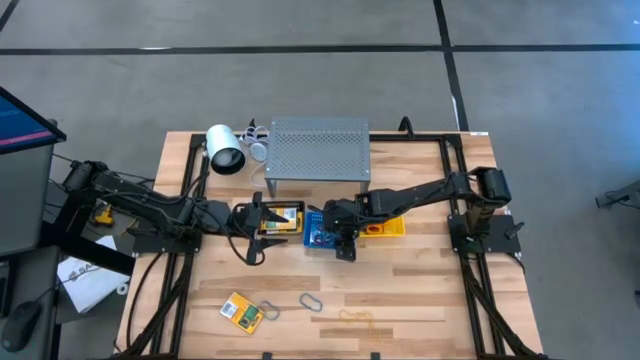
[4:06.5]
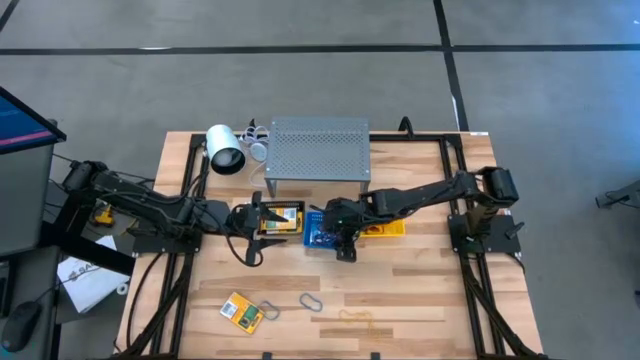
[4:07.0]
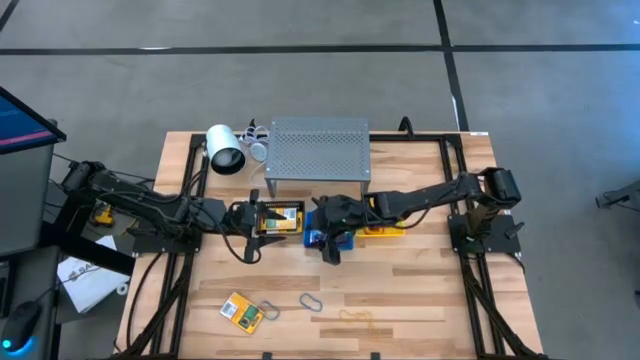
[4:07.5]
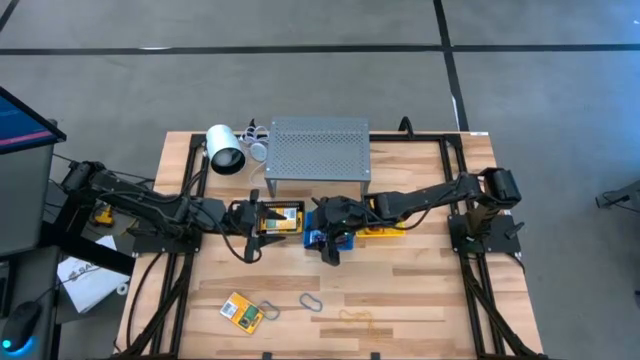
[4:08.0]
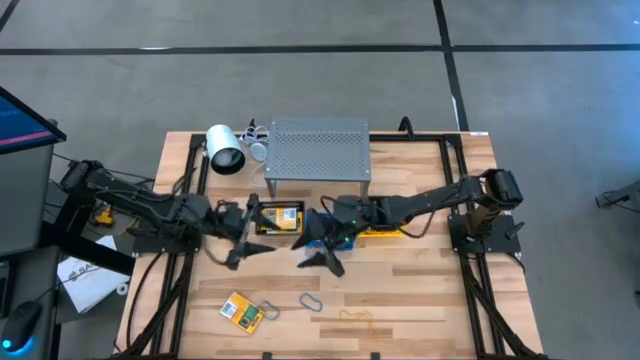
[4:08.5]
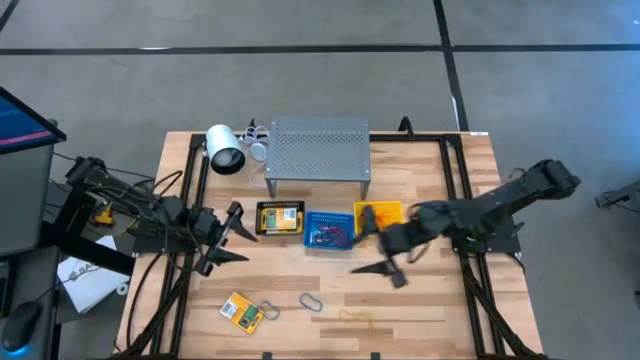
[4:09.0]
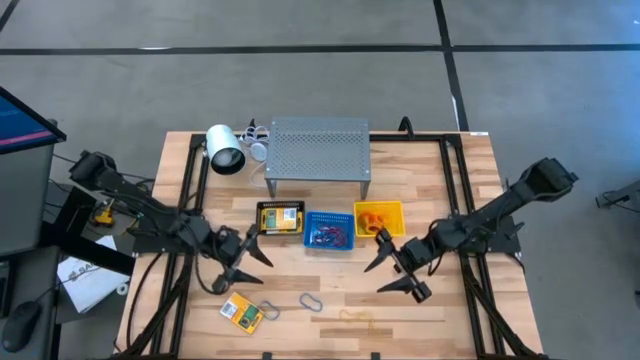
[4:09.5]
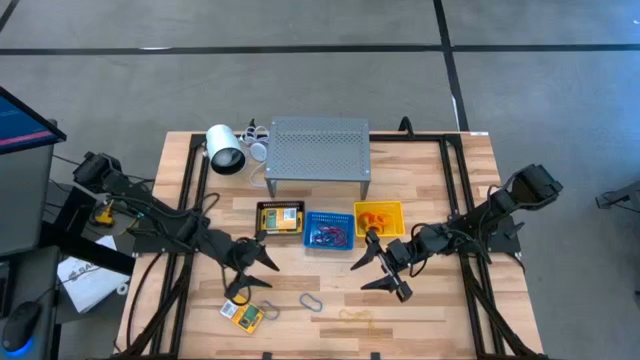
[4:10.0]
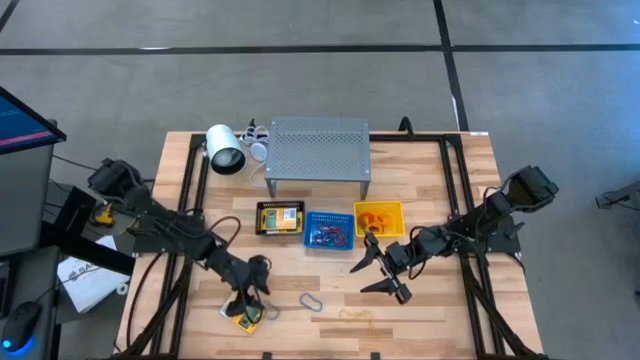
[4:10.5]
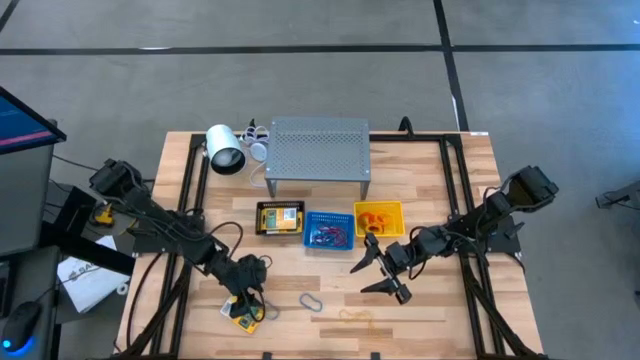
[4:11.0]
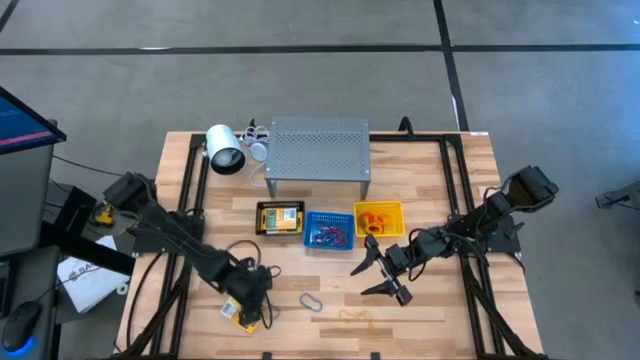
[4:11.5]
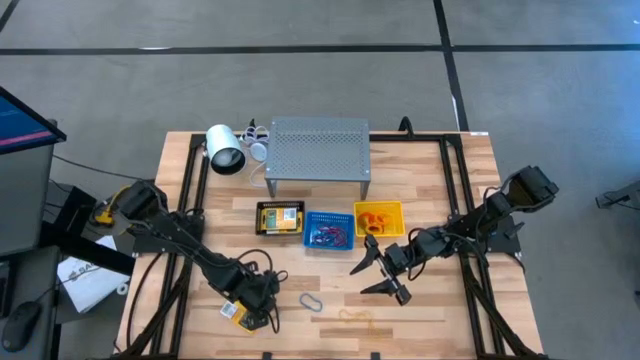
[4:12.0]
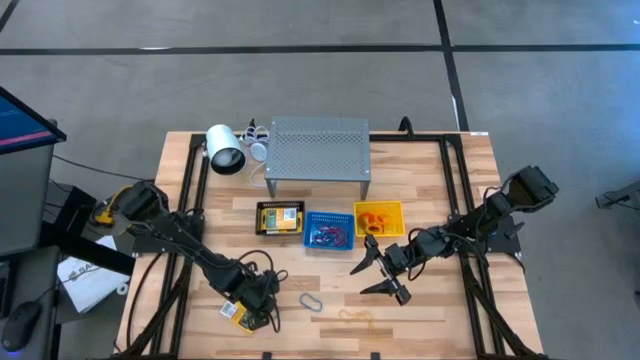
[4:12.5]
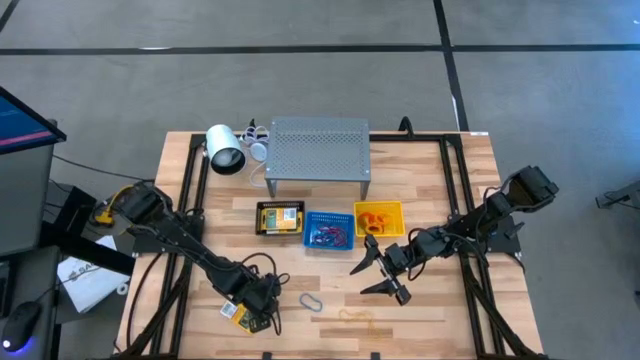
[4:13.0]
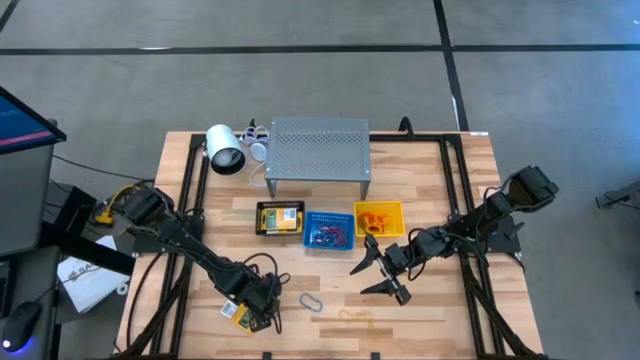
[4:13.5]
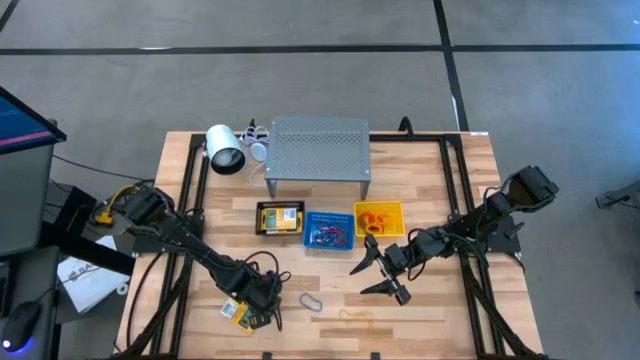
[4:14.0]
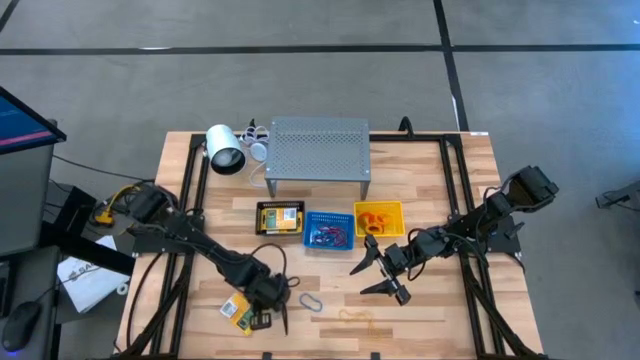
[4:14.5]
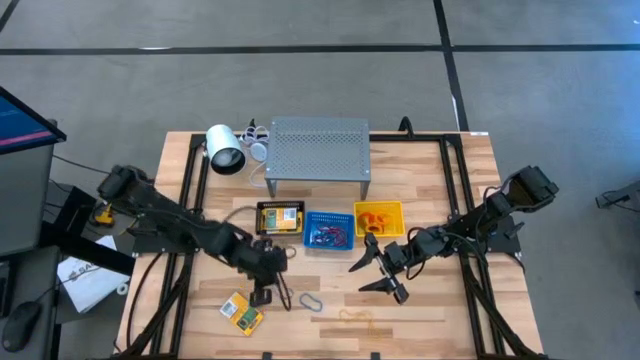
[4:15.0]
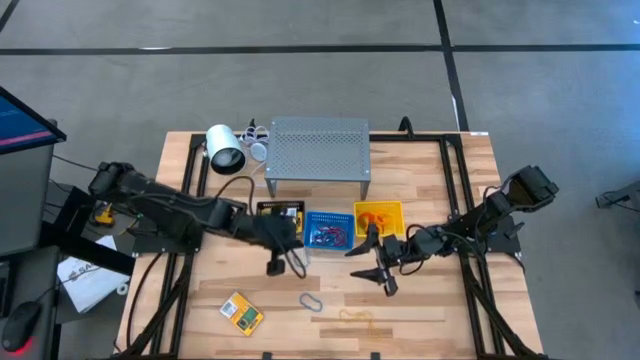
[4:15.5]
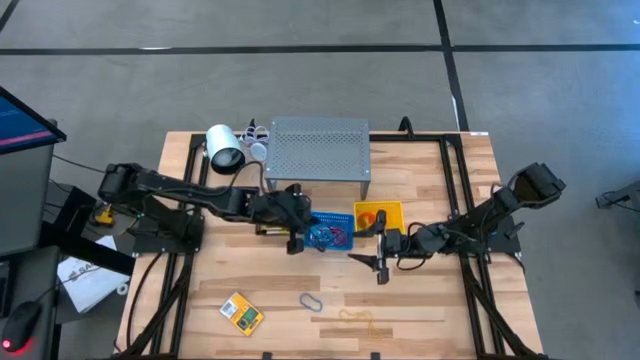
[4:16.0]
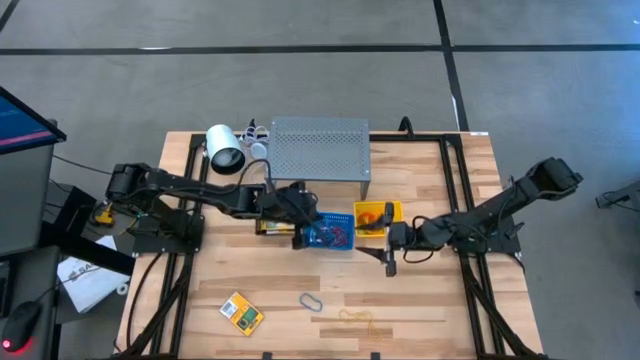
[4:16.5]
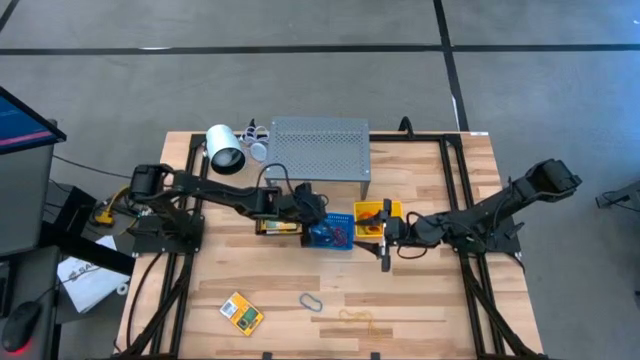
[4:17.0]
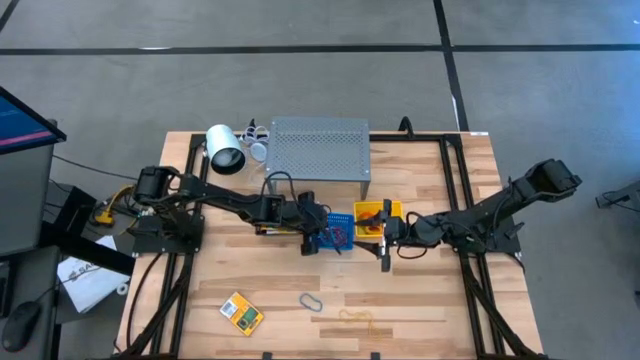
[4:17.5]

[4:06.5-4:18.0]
Task: Pick & Place Office Desk Supplies
Put the blue rubber band into the blue bin

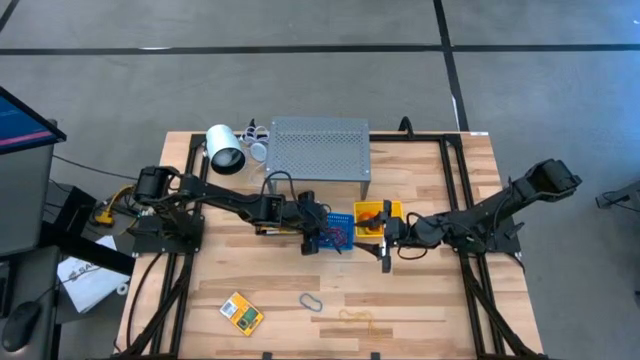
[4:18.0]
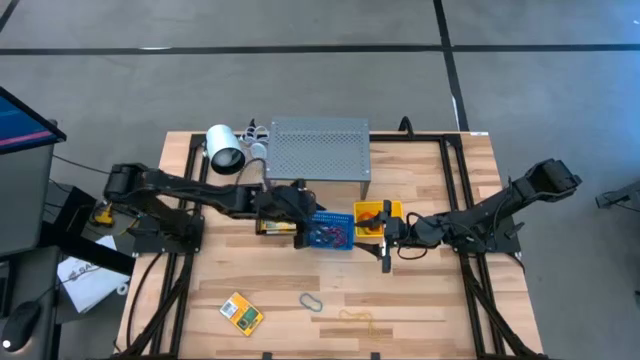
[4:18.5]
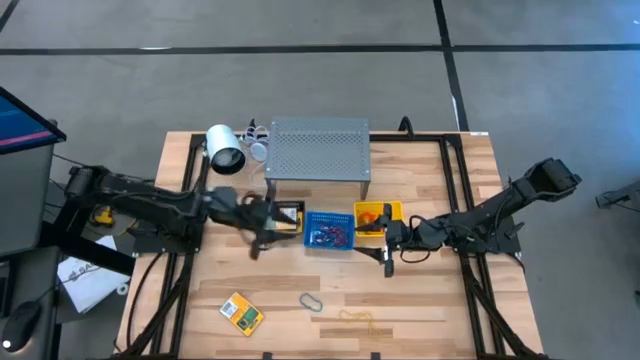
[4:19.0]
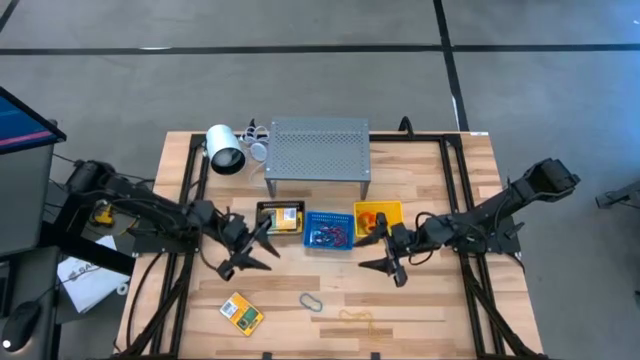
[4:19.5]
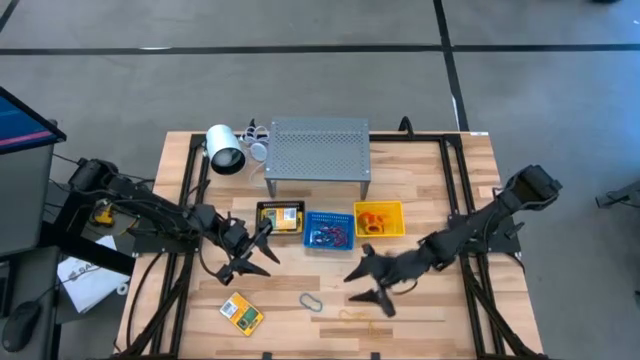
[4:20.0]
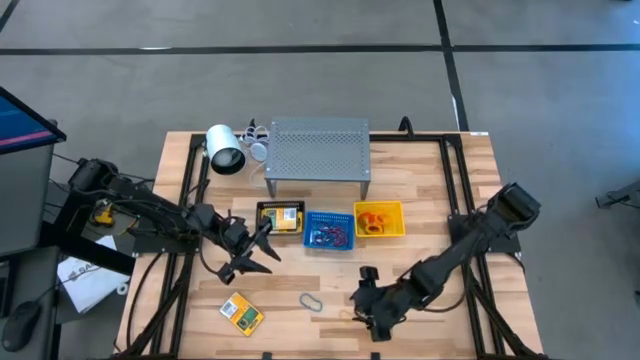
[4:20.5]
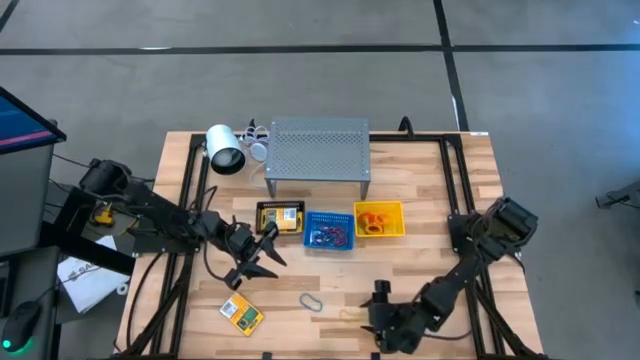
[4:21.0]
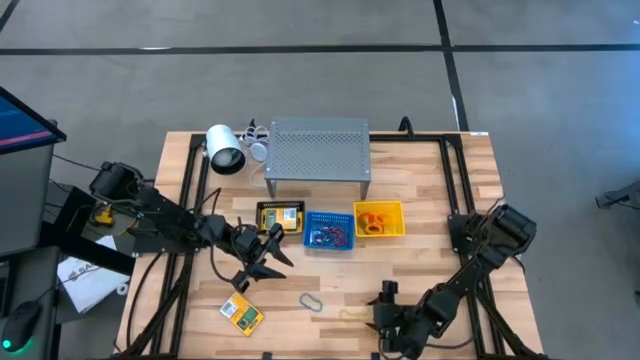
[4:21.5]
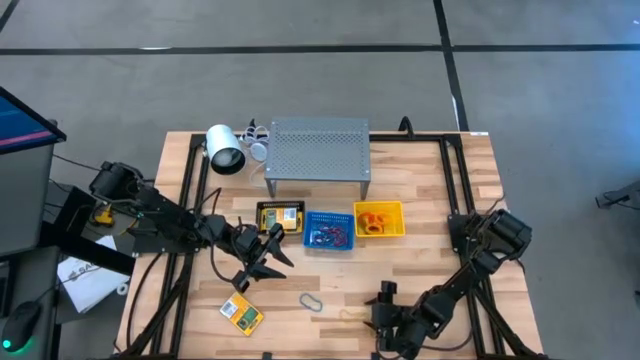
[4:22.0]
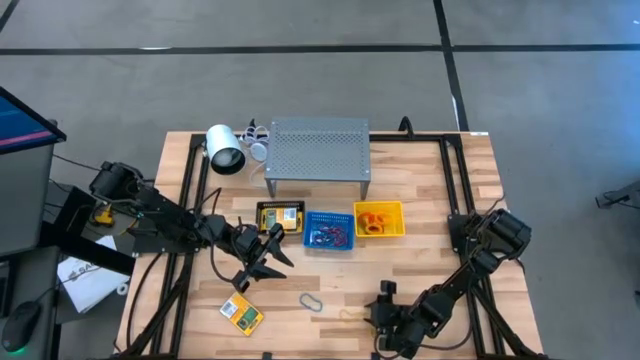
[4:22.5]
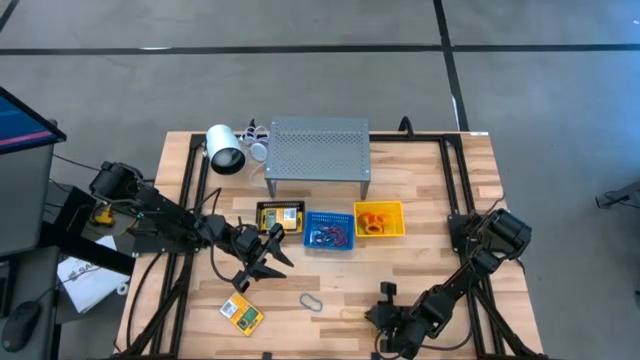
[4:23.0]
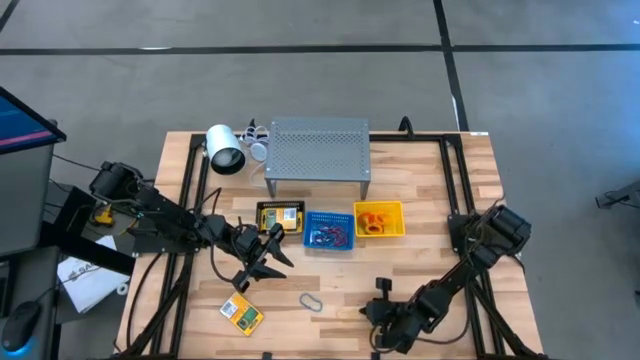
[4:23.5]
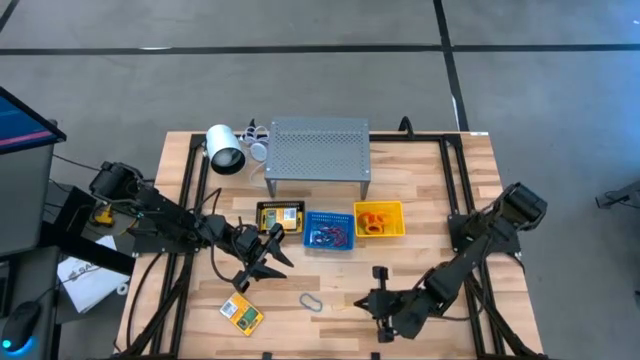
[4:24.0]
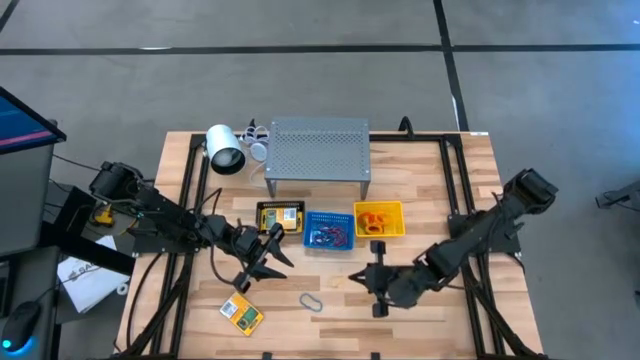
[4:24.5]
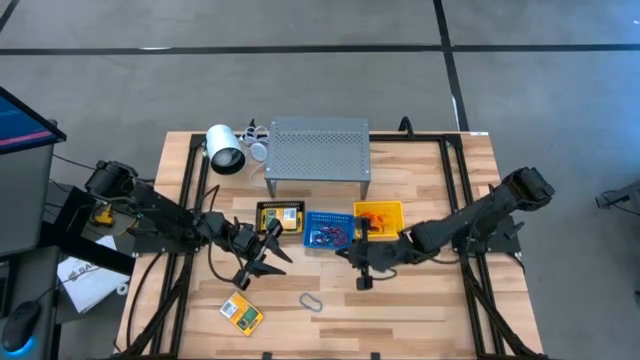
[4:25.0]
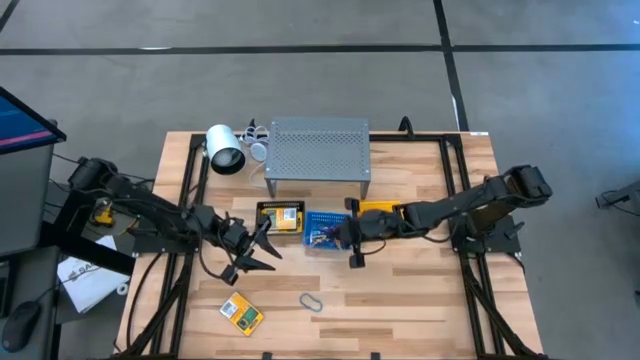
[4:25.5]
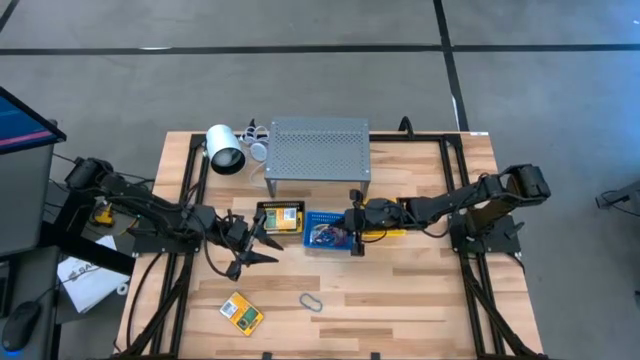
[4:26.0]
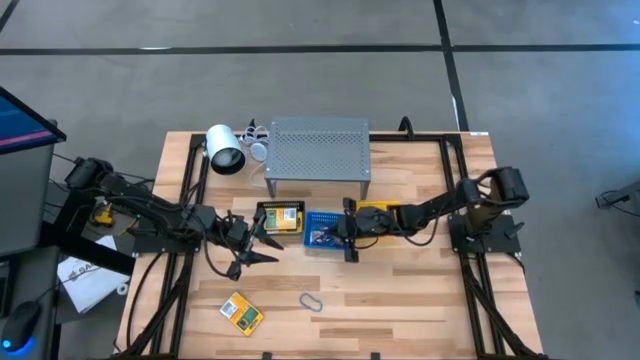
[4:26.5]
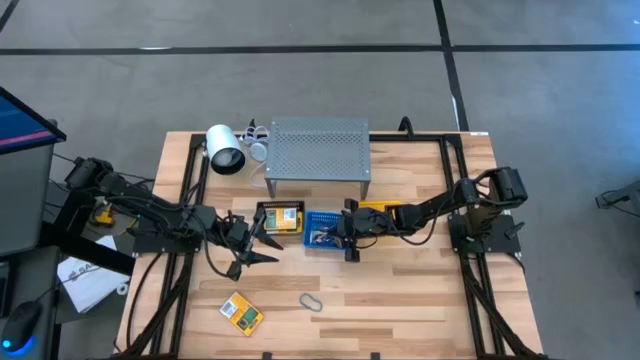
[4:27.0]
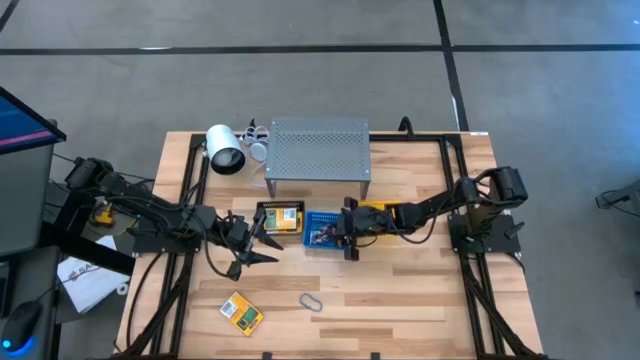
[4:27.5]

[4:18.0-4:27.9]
Put the yellow rubber band into the blue bin
